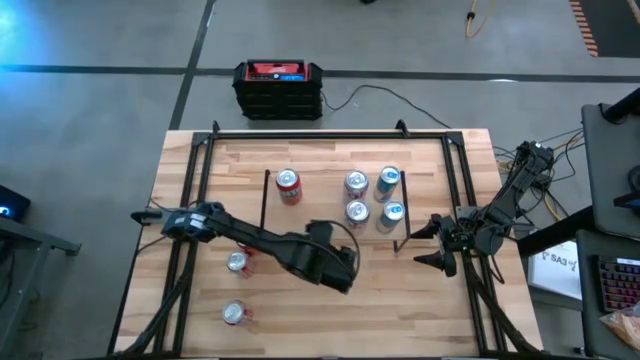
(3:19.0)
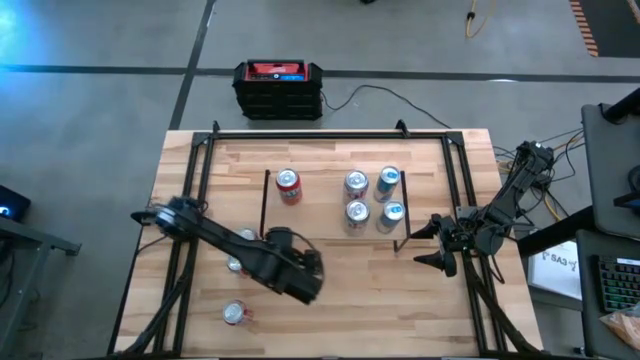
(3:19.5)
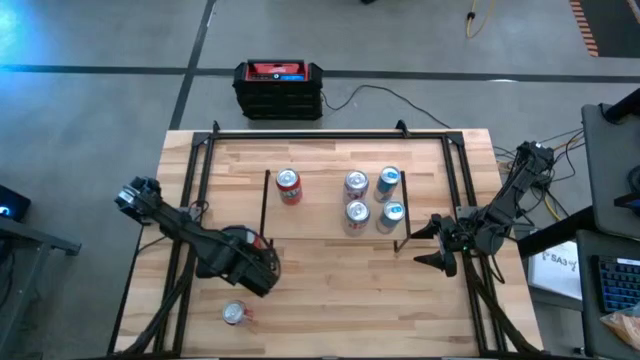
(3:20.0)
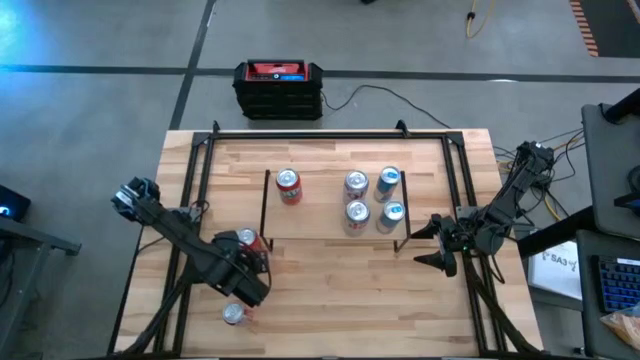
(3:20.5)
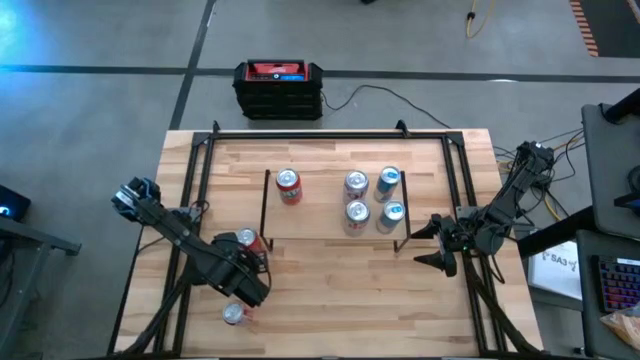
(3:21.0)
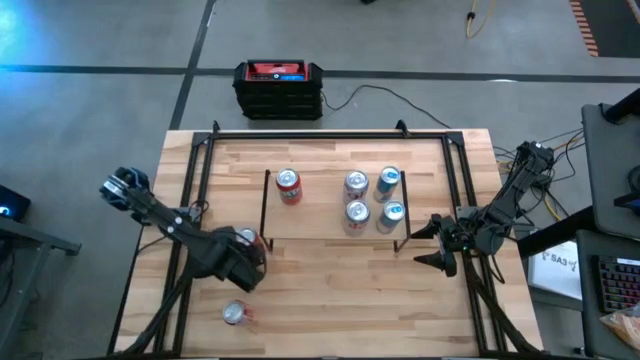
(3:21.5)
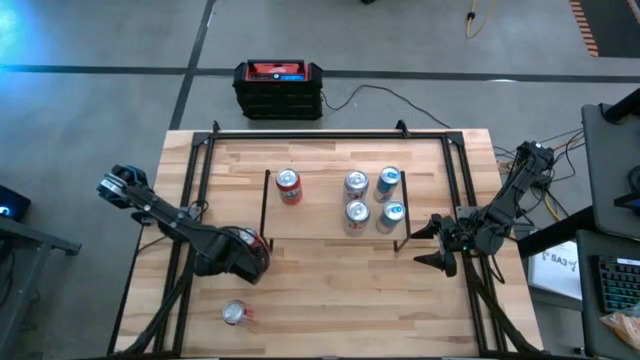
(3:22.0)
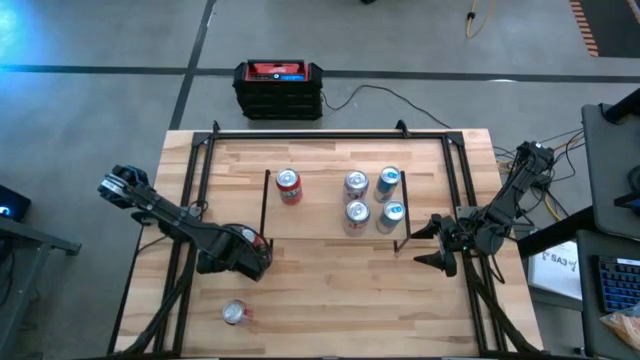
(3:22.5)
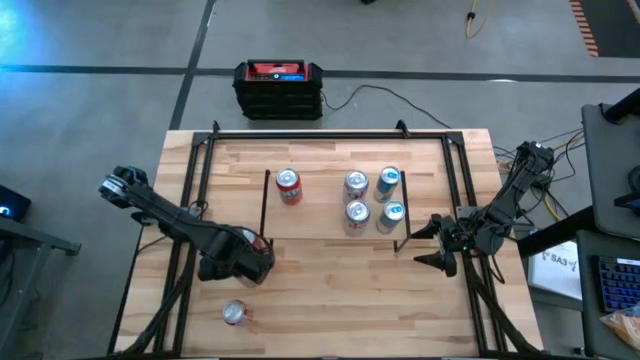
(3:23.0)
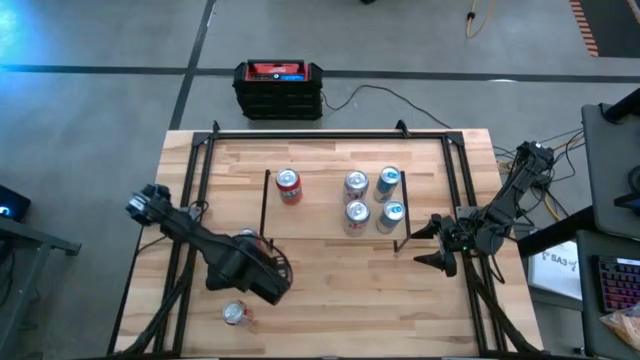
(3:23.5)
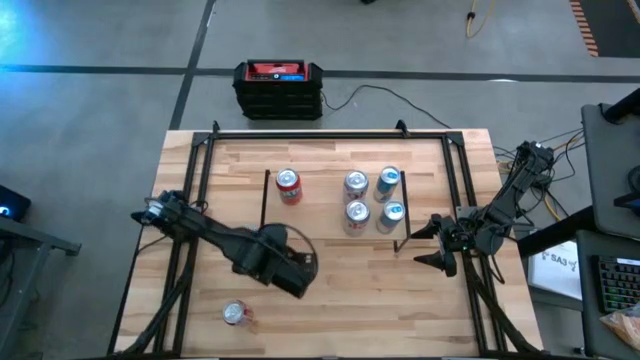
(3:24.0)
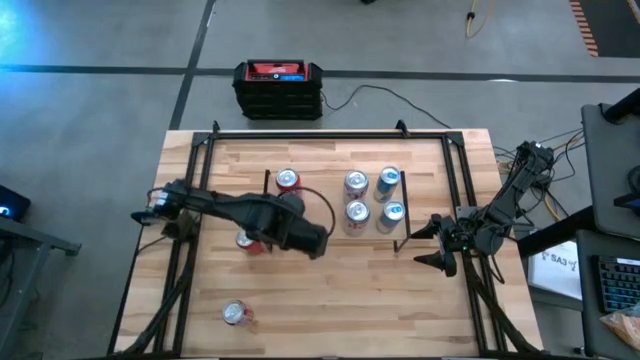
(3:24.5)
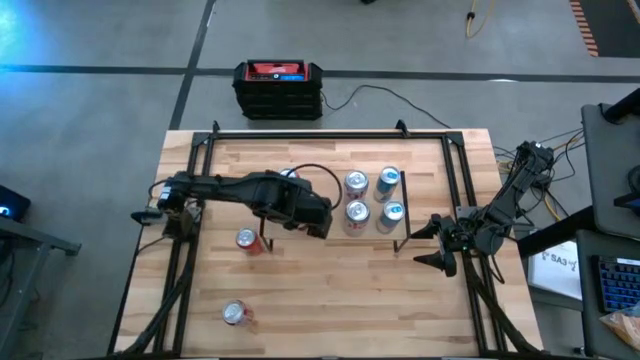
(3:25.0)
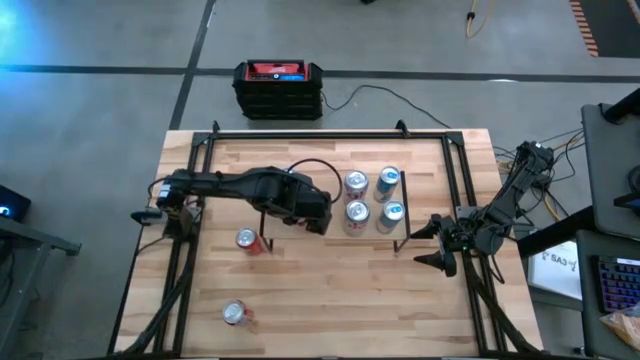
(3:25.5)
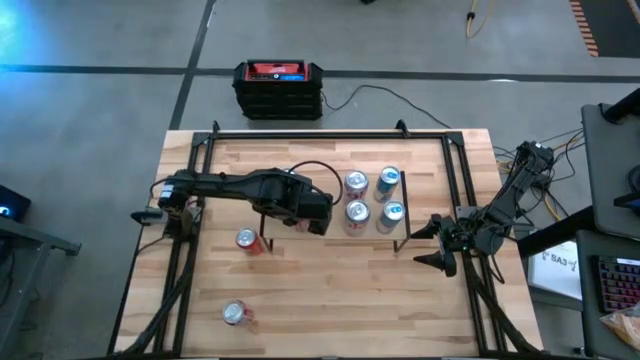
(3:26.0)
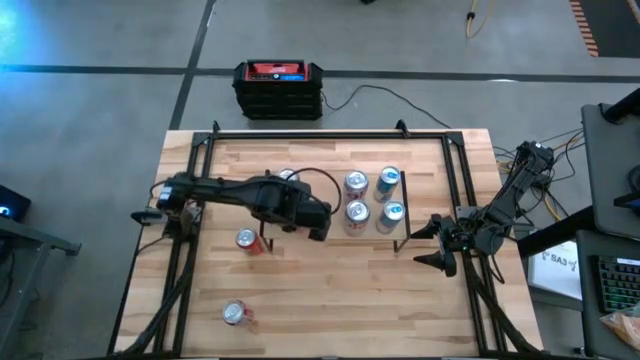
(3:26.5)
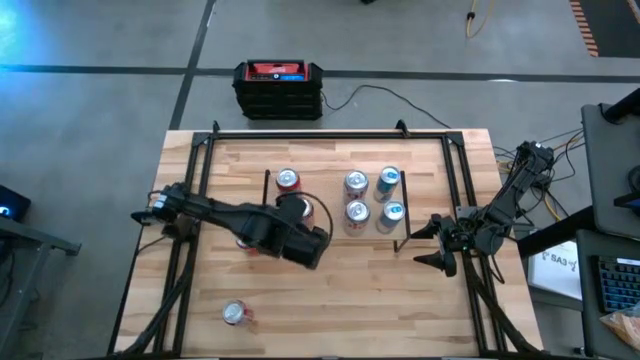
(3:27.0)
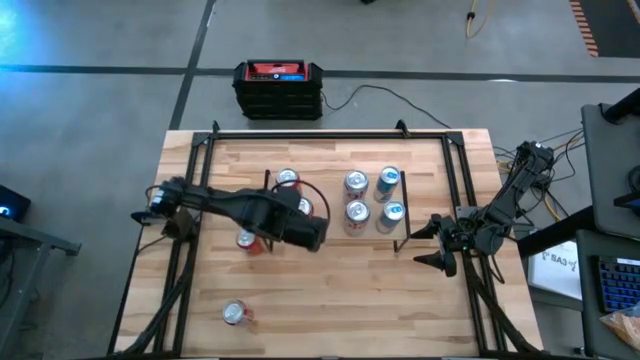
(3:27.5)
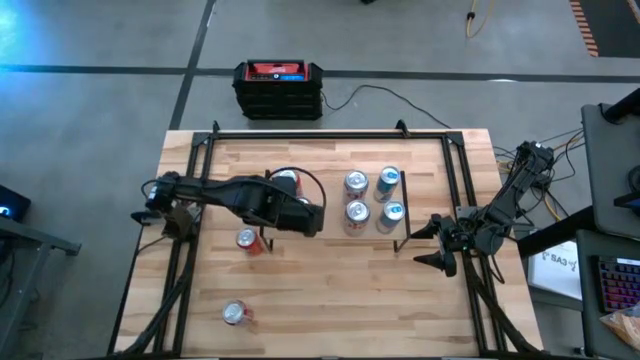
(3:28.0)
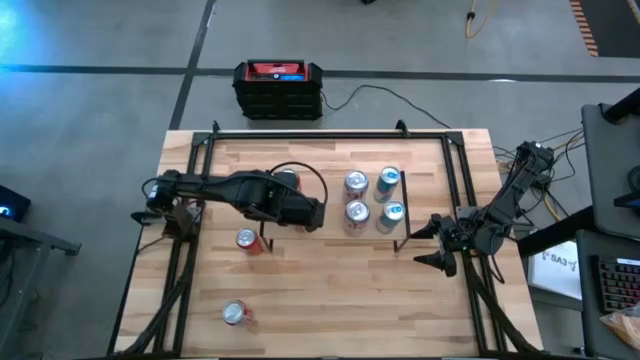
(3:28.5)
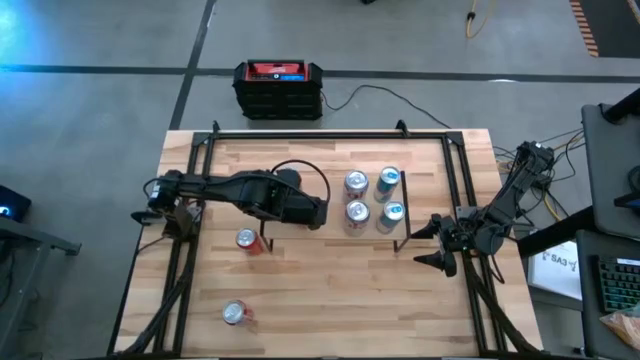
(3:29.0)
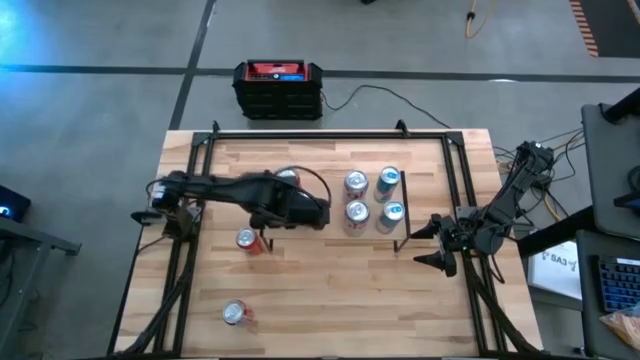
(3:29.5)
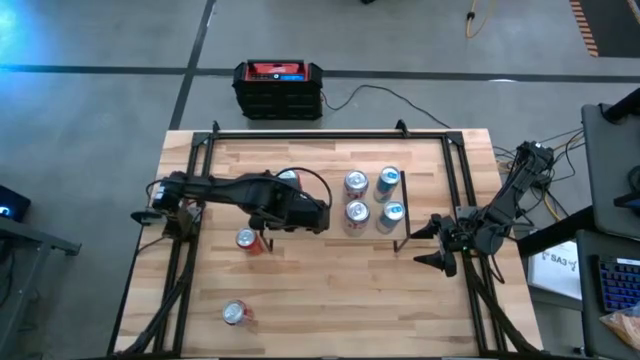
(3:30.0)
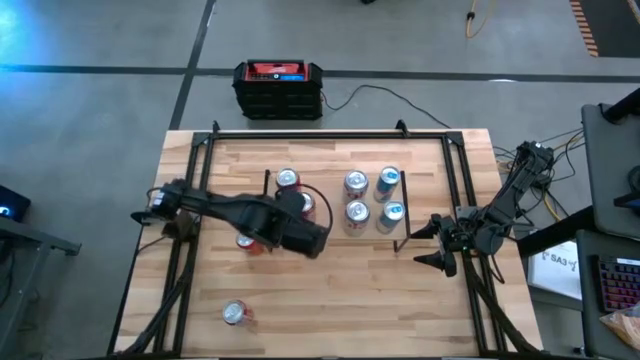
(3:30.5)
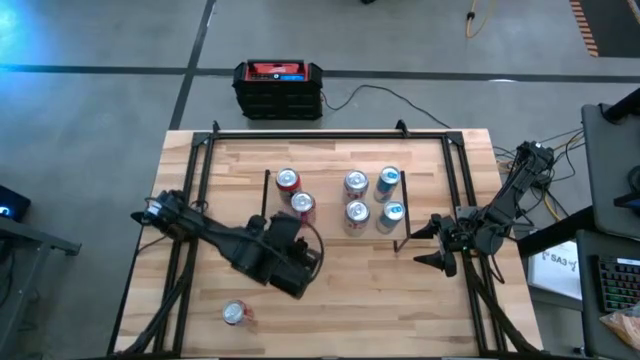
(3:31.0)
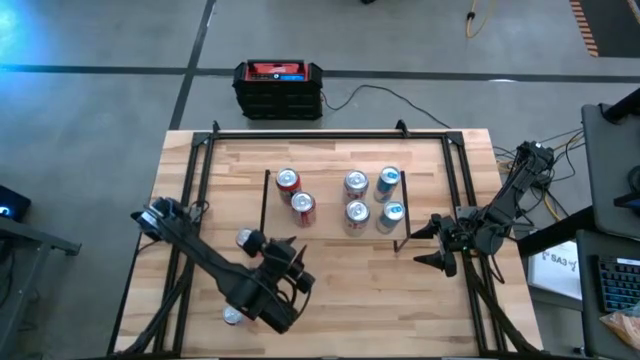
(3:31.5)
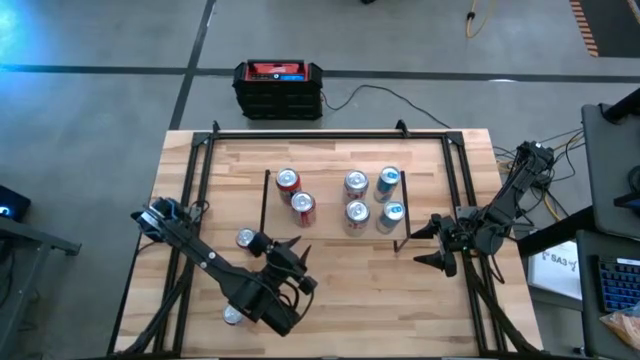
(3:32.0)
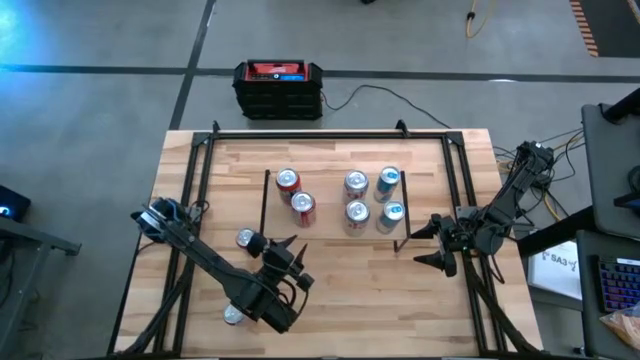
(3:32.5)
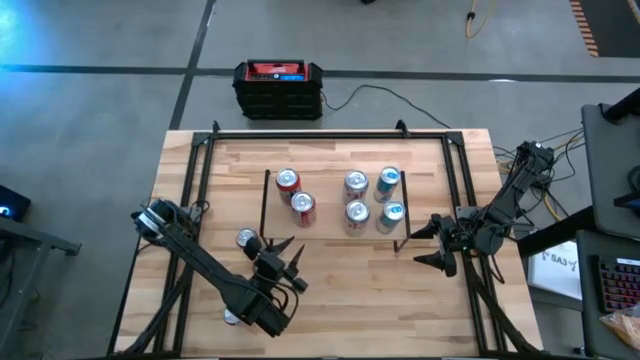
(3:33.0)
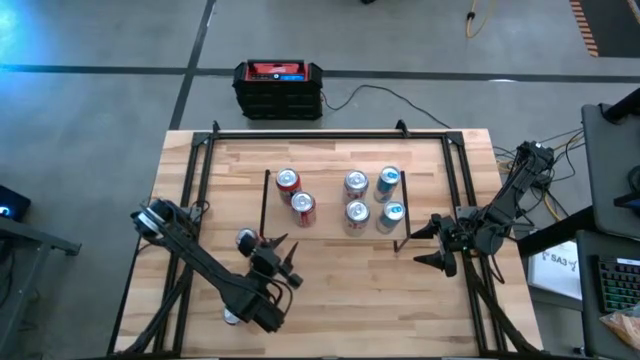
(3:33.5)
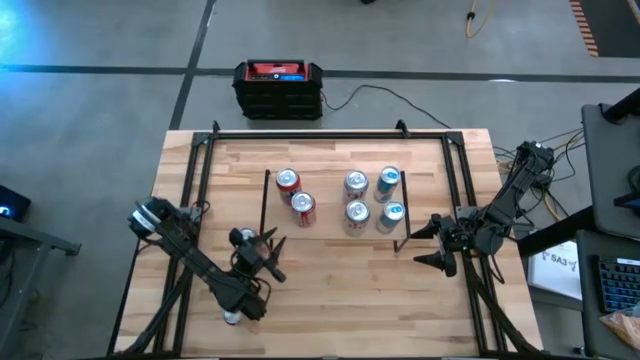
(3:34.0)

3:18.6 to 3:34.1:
Task: Place canned beverage on shelf
Put the top red white soda can on the shelf

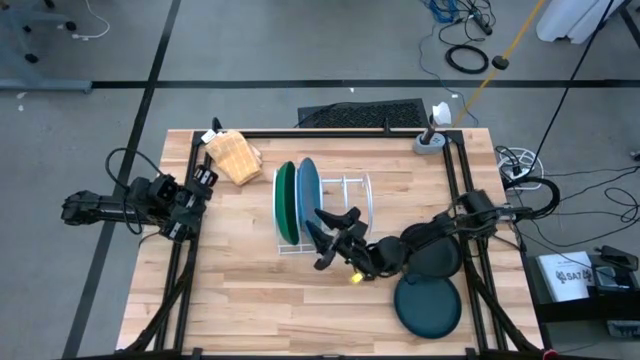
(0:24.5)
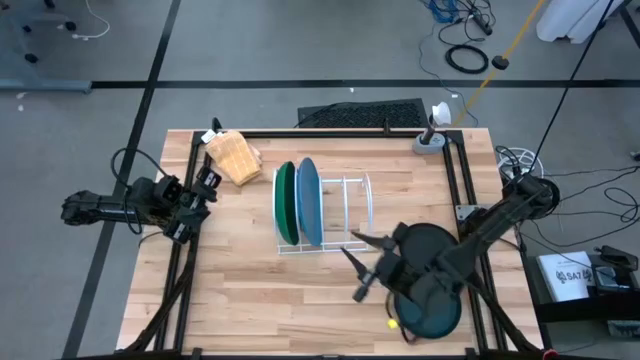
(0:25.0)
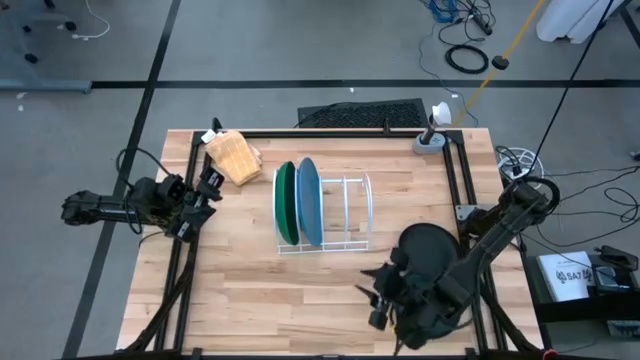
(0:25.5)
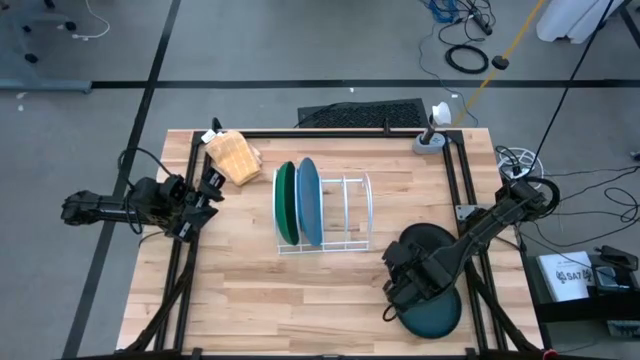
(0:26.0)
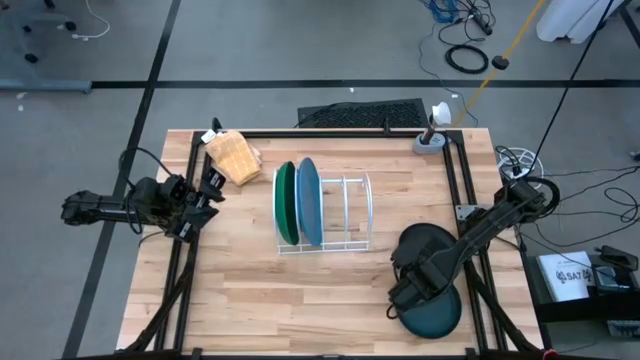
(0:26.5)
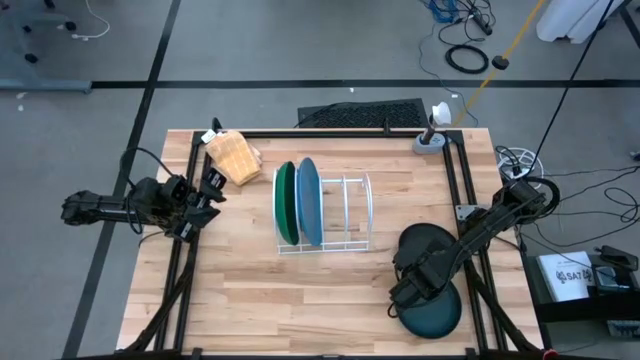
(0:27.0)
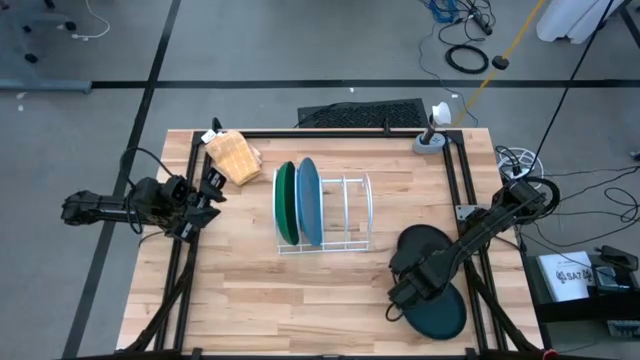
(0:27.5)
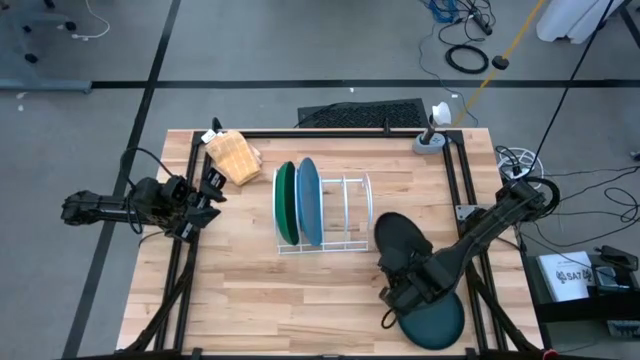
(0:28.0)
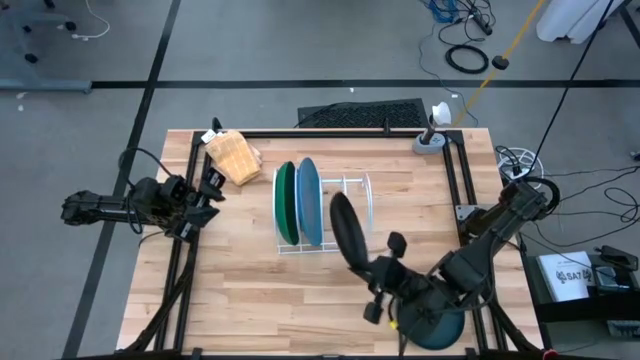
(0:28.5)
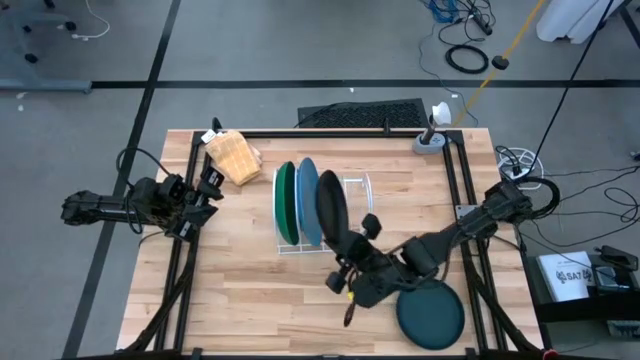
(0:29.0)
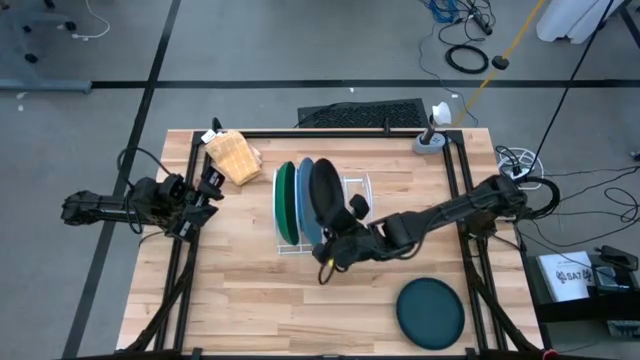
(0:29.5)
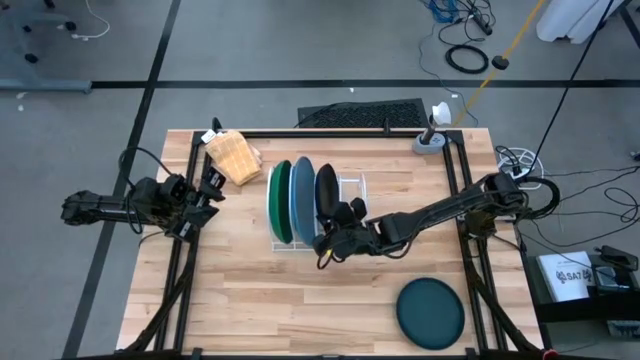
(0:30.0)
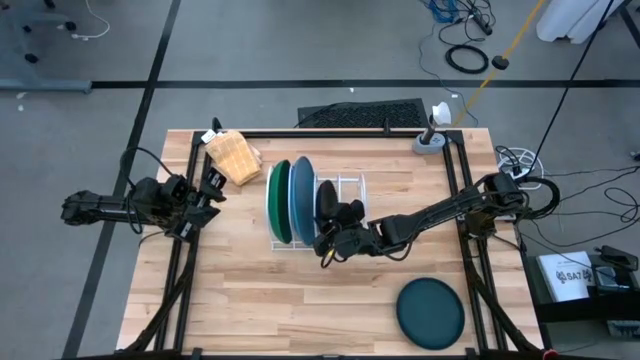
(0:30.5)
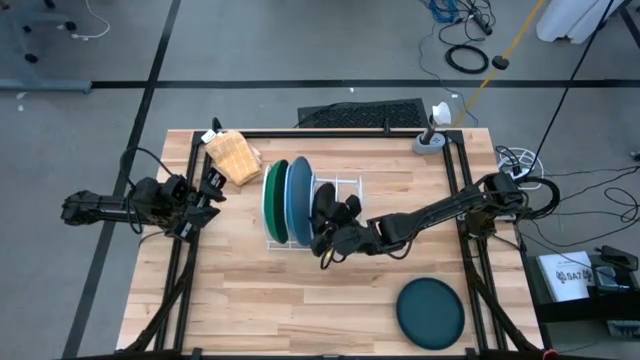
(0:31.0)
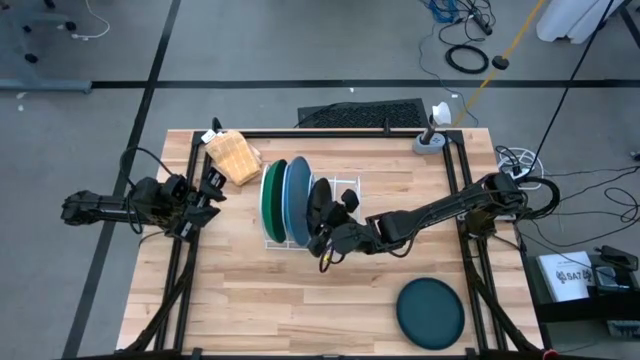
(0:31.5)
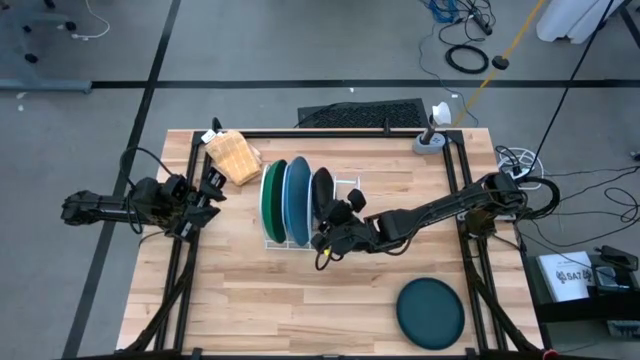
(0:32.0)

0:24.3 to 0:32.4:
Task: Sort dishes
Put the black plate in the dish rack
